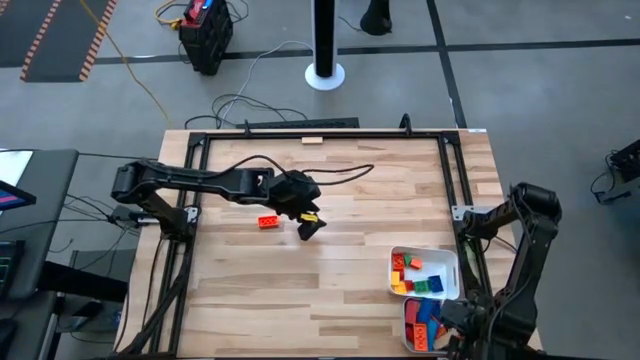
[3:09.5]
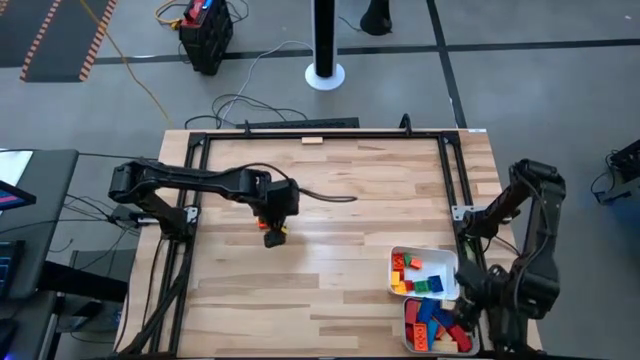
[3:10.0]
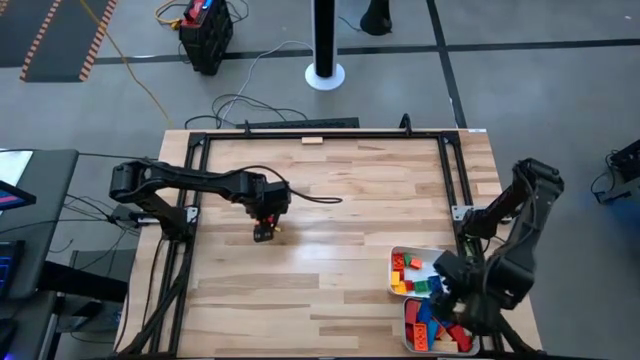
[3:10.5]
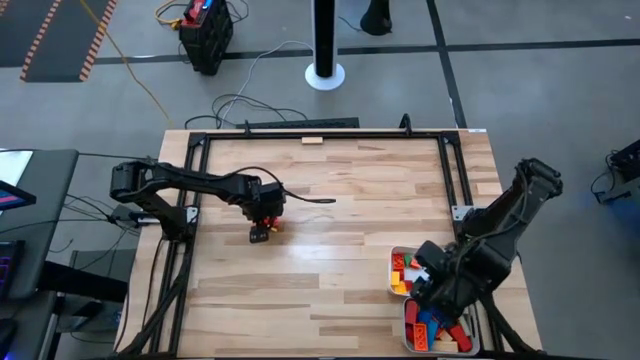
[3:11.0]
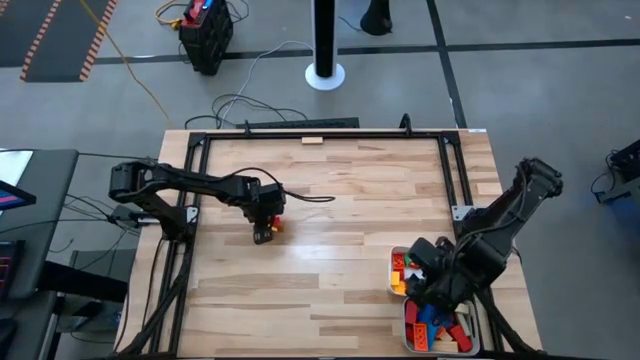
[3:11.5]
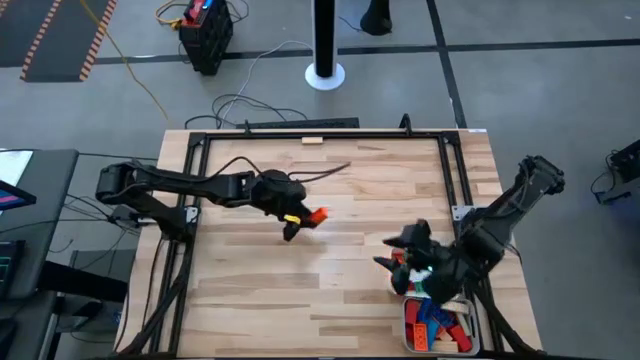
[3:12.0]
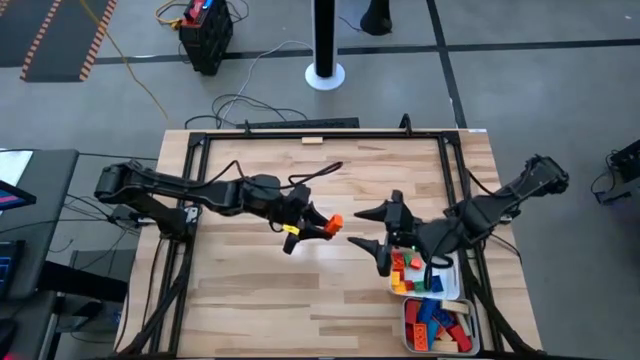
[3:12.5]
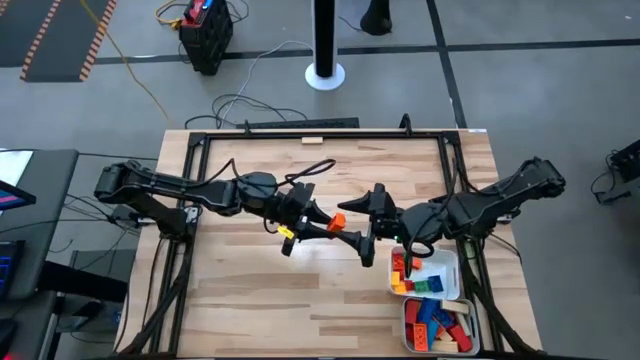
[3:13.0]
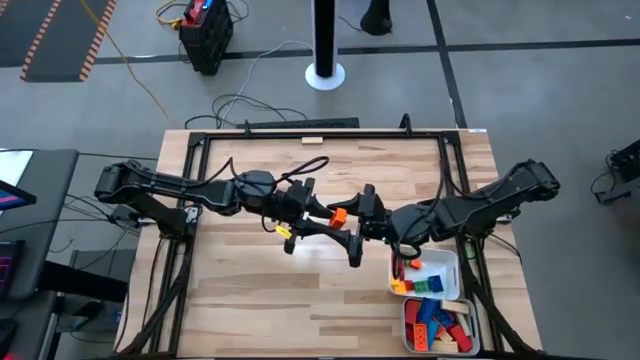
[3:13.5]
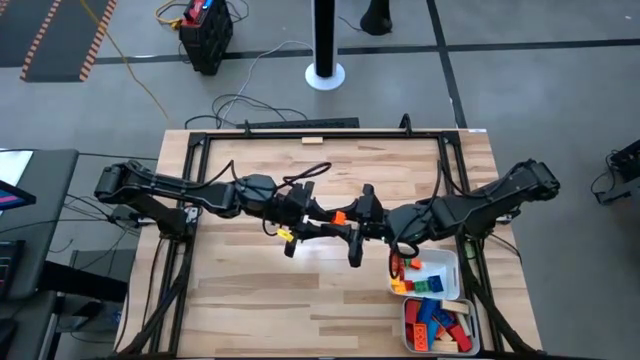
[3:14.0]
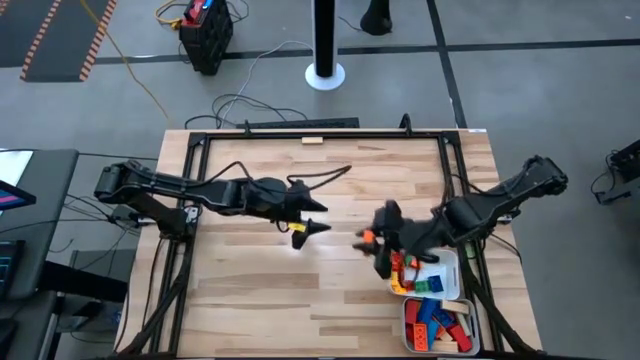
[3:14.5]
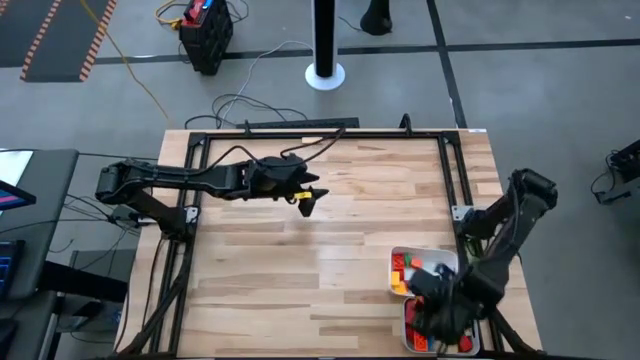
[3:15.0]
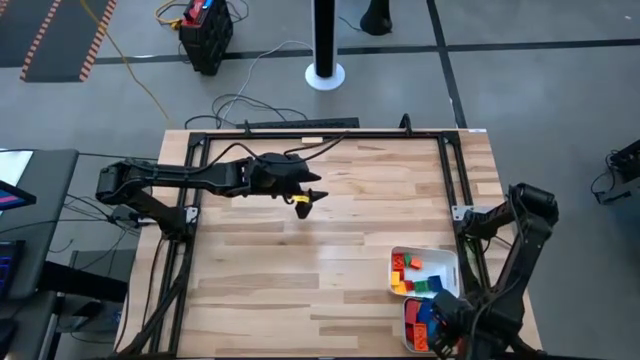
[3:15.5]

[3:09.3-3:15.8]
Task: Sort blocks by size
Put the big orange game piece into the gray bin

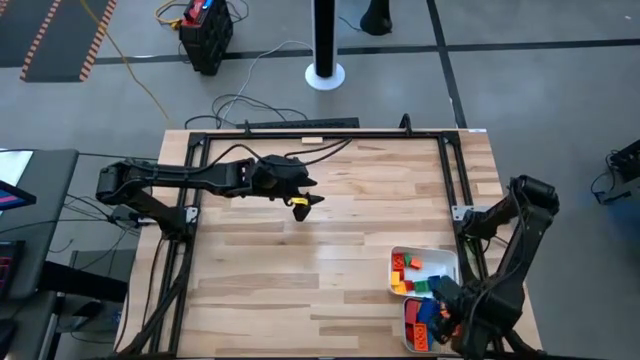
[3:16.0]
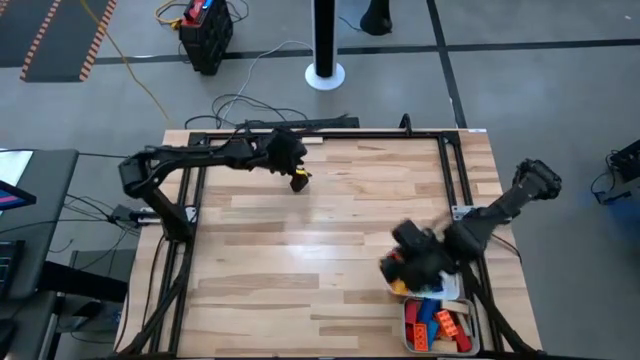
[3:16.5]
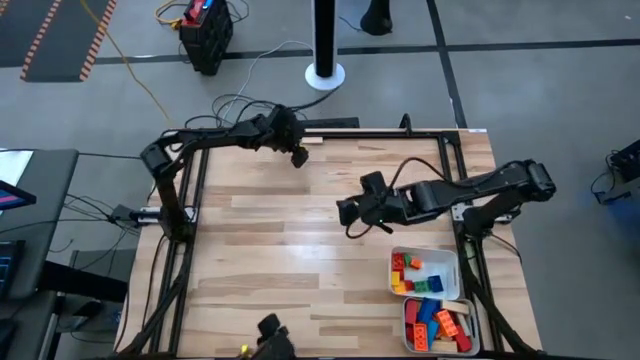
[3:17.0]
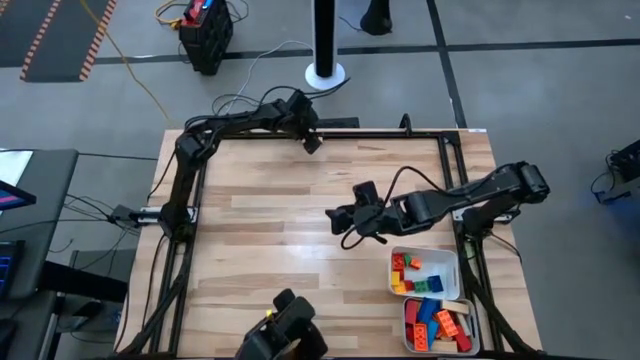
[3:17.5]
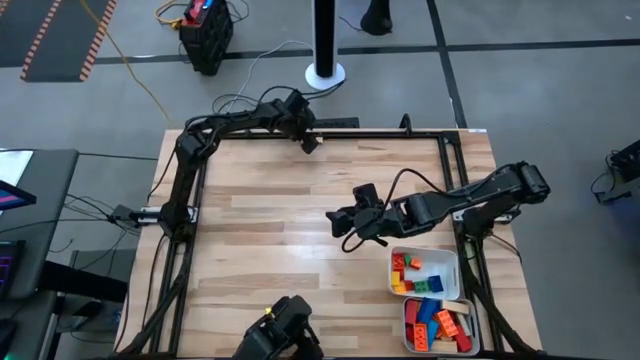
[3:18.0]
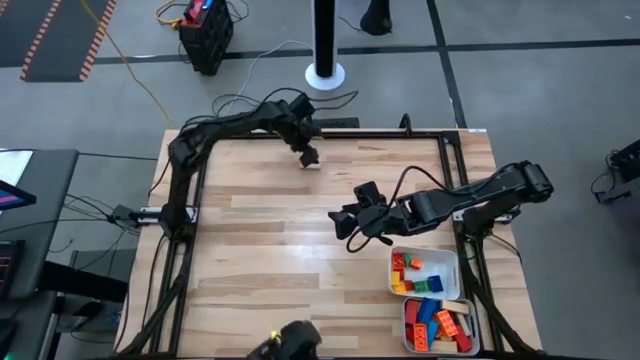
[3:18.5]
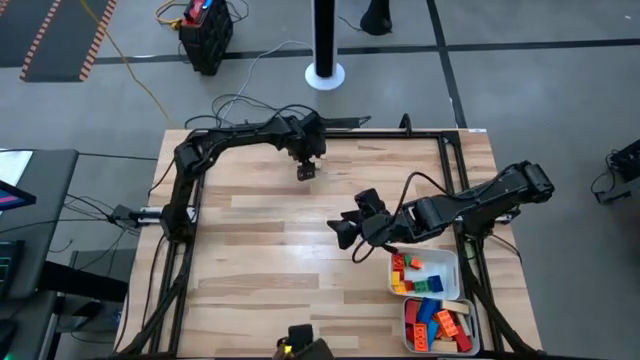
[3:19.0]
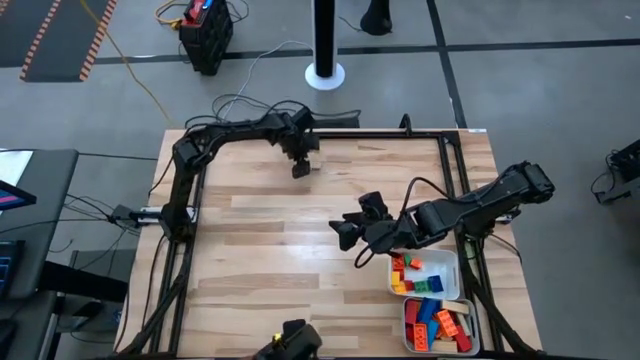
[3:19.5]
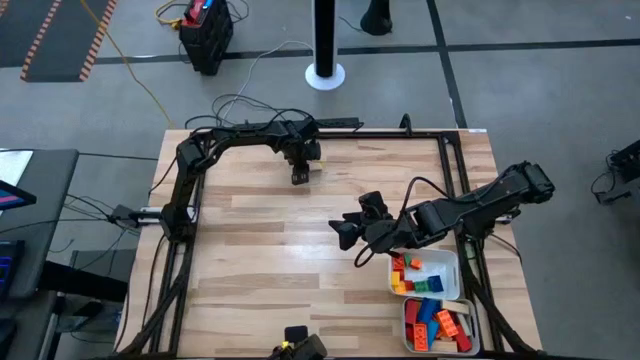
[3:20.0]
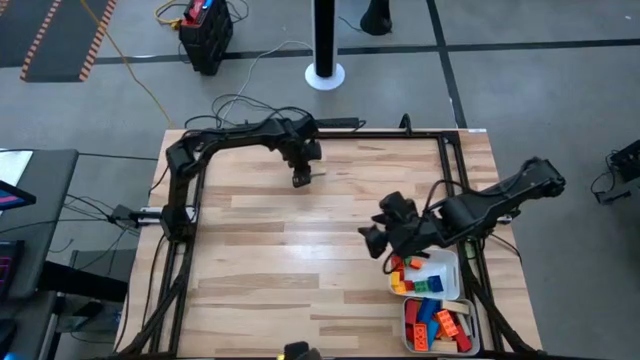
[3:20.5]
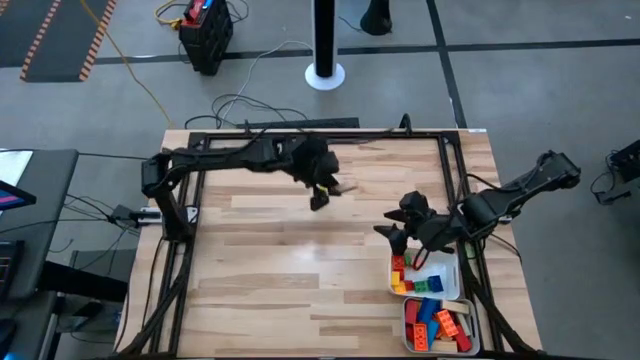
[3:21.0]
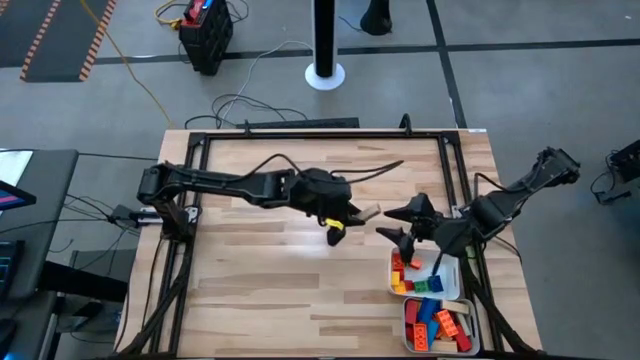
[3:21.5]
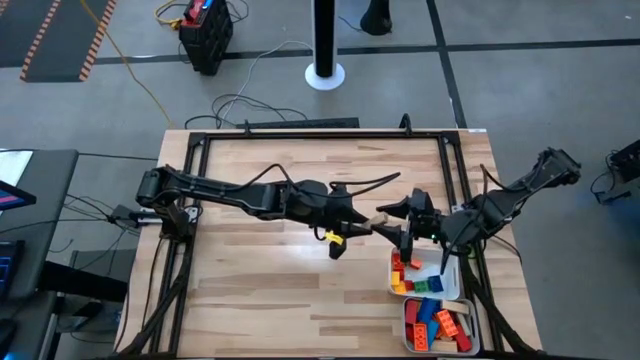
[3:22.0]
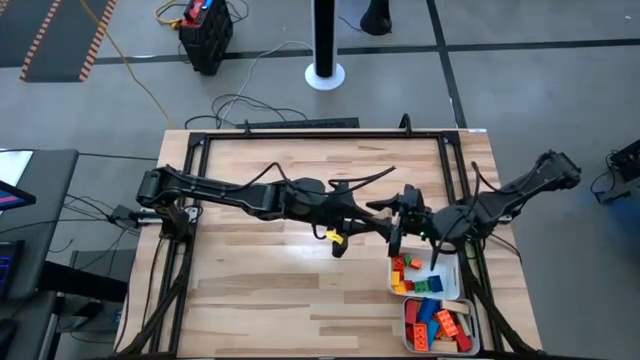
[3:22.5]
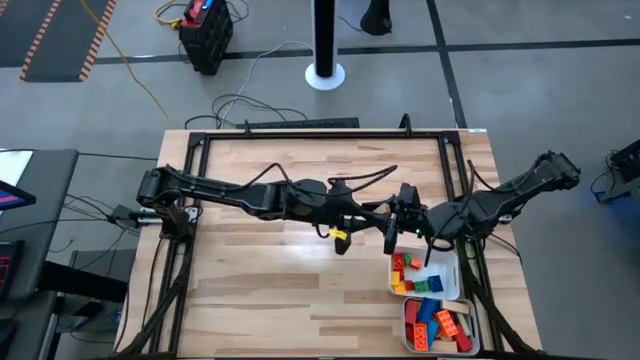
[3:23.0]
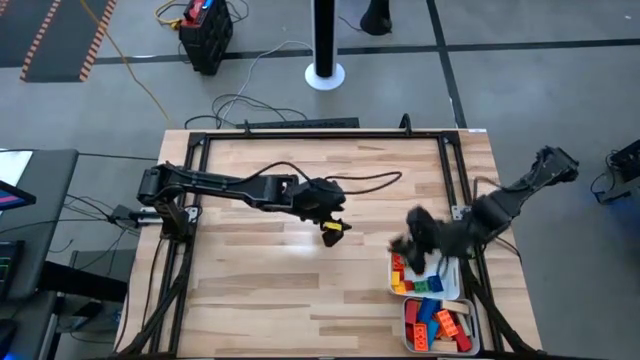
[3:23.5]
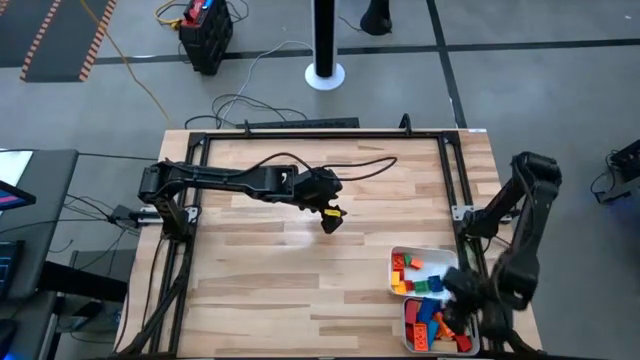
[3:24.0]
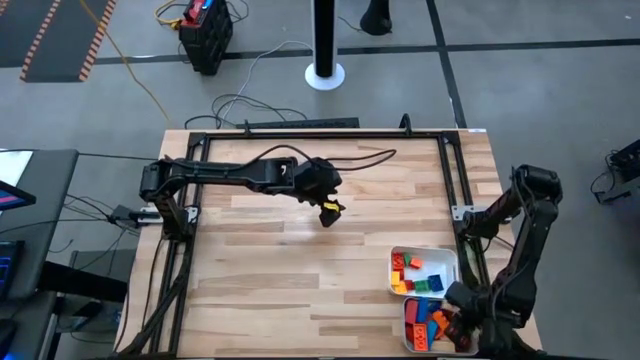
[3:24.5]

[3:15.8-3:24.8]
Put the big brown block into the gray bin

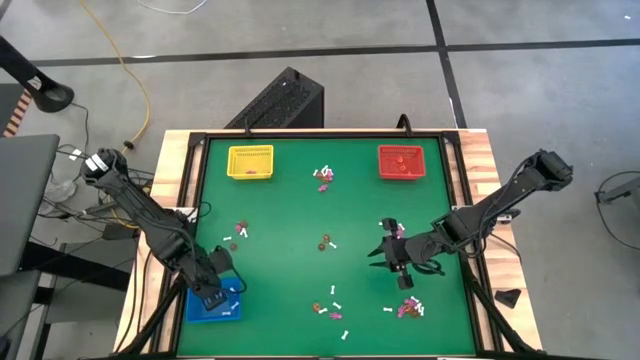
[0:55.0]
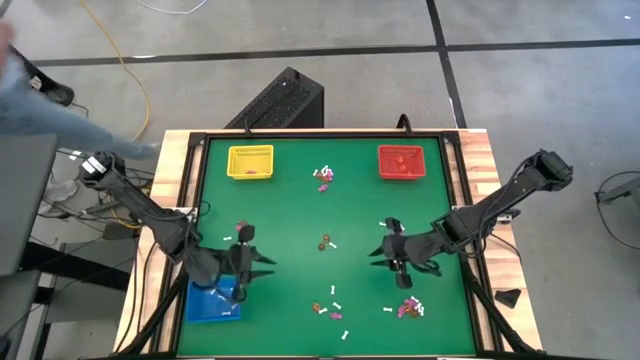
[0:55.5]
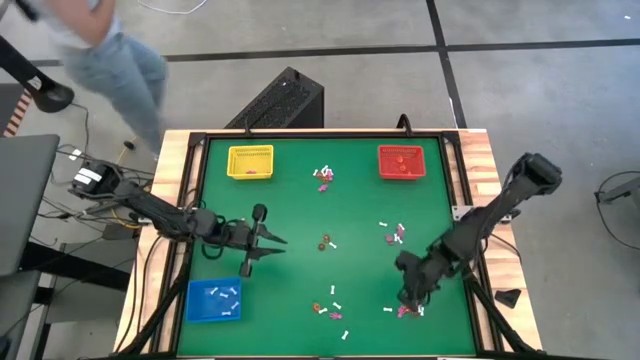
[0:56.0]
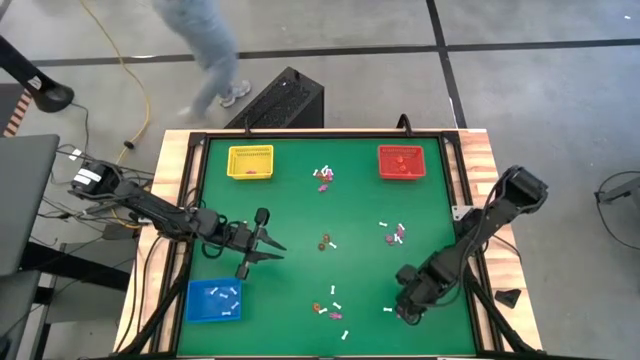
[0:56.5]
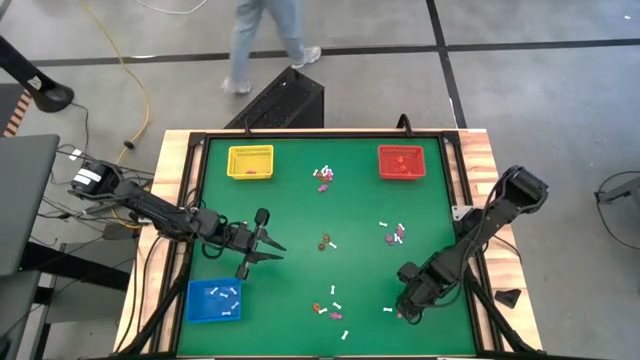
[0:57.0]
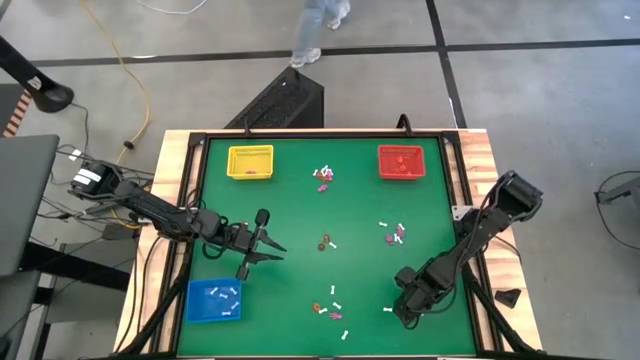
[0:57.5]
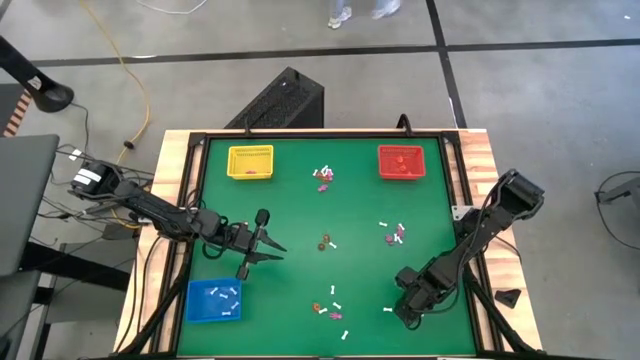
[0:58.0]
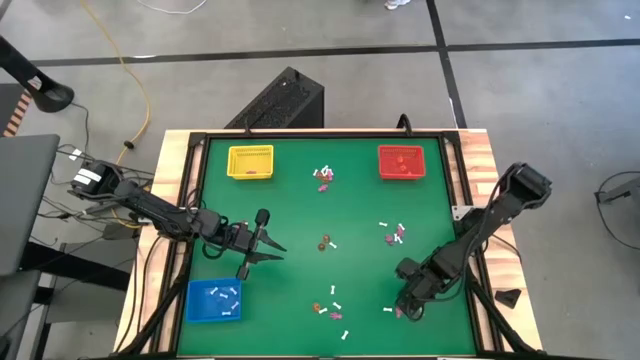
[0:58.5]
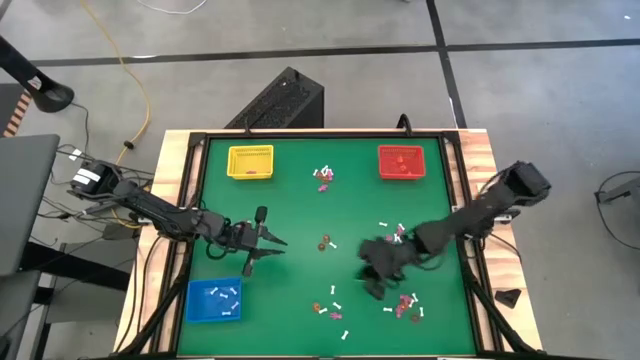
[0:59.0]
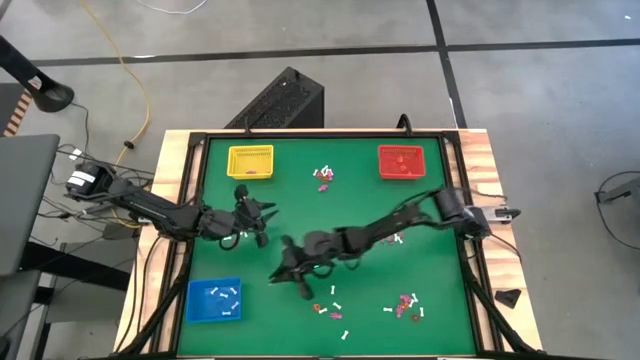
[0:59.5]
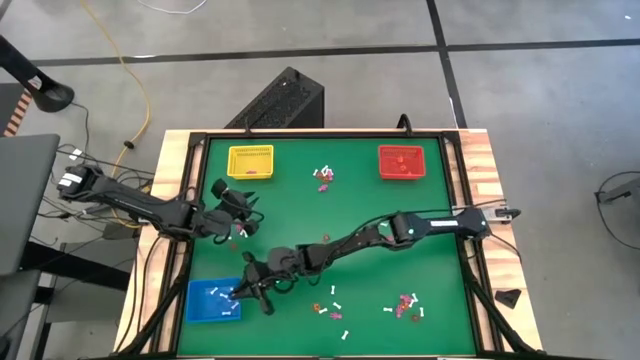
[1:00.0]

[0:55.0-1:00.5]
Task: Sort Halloween decoration
Put the white bone toy into the blue bin
